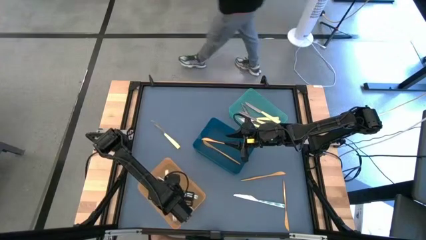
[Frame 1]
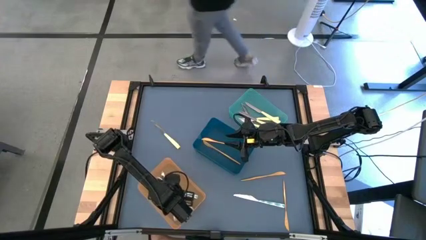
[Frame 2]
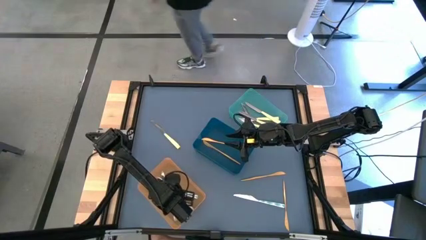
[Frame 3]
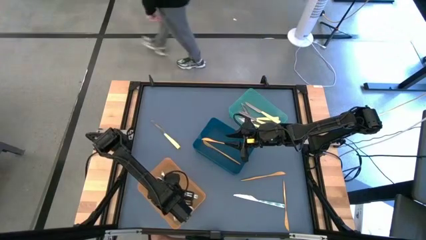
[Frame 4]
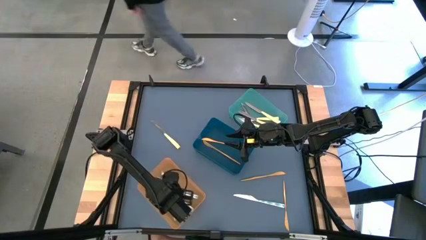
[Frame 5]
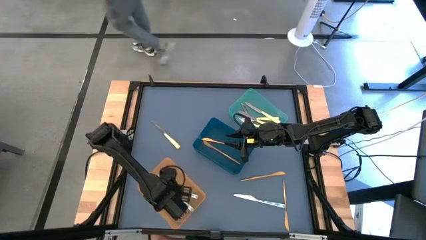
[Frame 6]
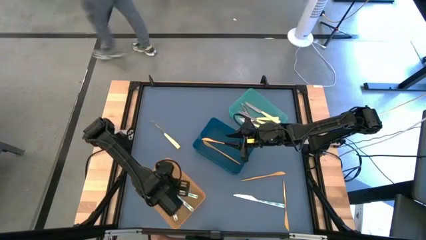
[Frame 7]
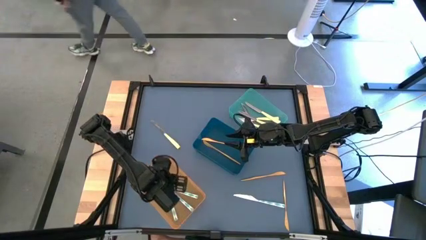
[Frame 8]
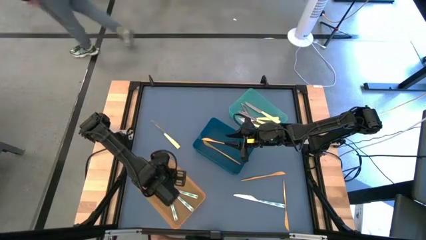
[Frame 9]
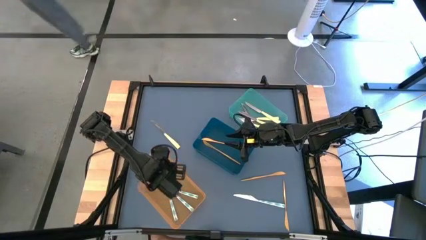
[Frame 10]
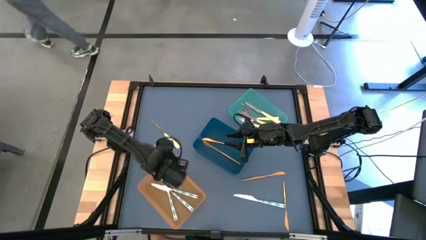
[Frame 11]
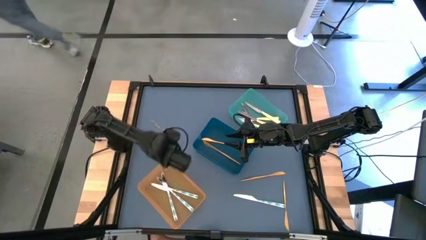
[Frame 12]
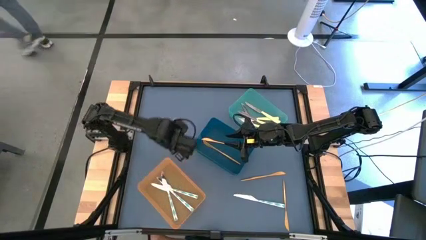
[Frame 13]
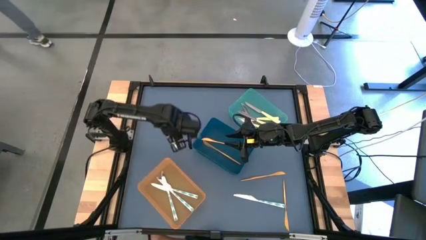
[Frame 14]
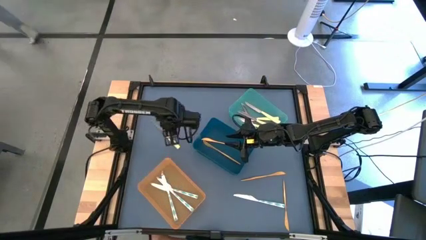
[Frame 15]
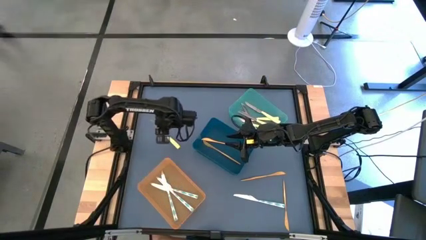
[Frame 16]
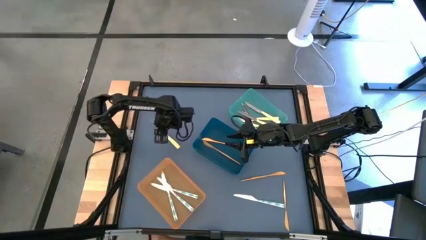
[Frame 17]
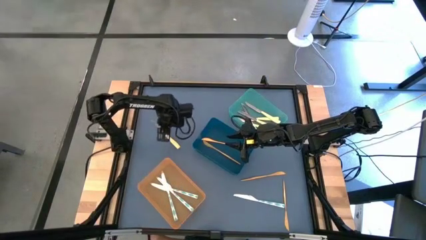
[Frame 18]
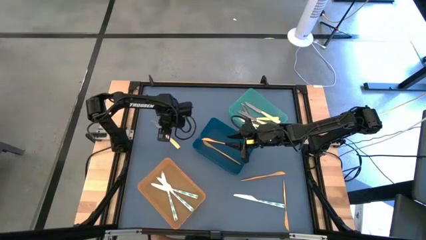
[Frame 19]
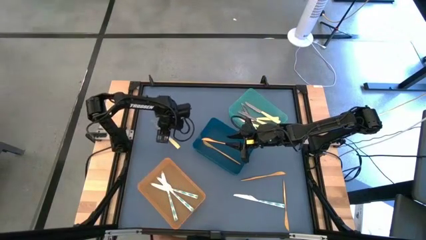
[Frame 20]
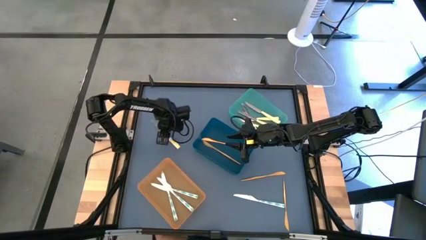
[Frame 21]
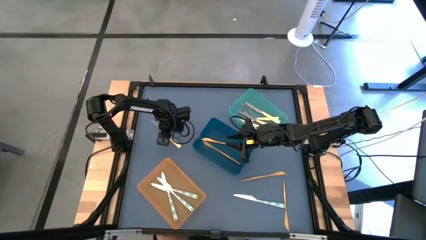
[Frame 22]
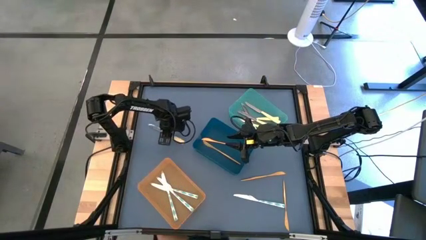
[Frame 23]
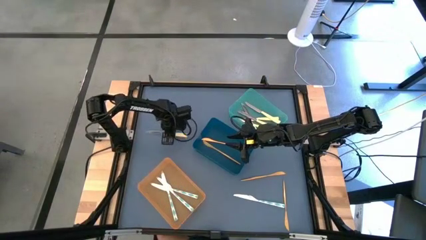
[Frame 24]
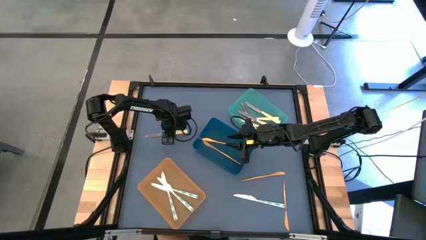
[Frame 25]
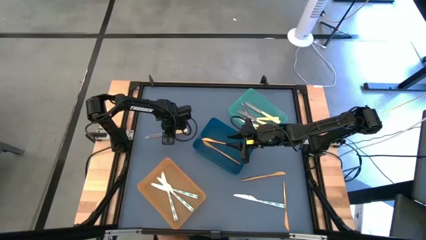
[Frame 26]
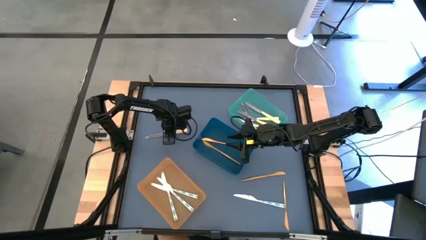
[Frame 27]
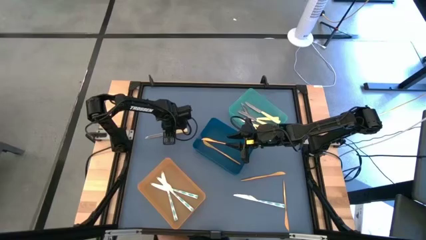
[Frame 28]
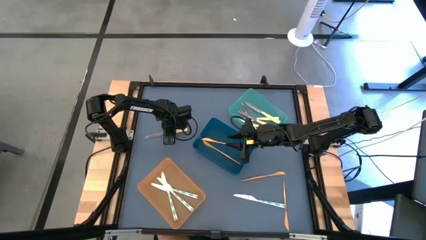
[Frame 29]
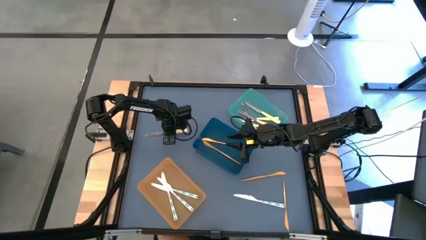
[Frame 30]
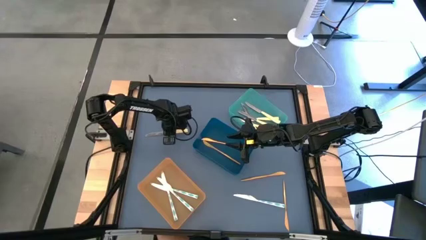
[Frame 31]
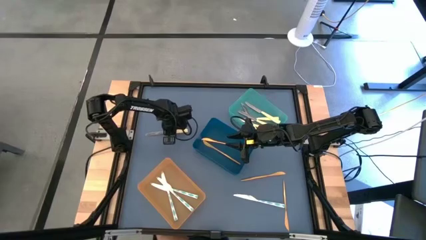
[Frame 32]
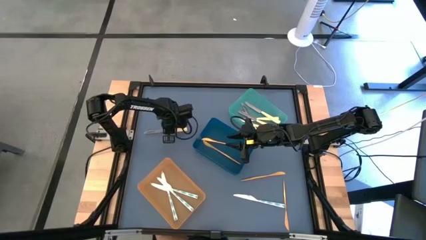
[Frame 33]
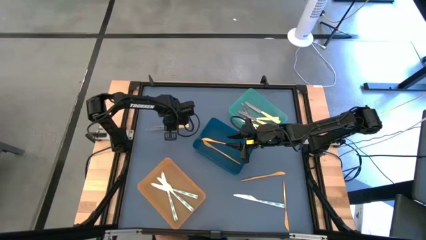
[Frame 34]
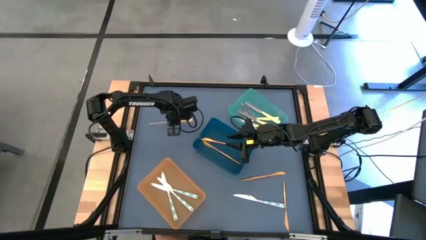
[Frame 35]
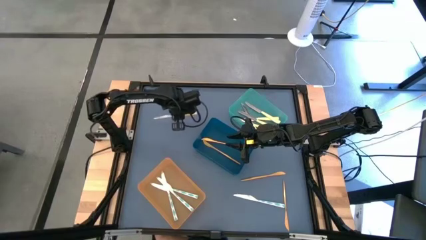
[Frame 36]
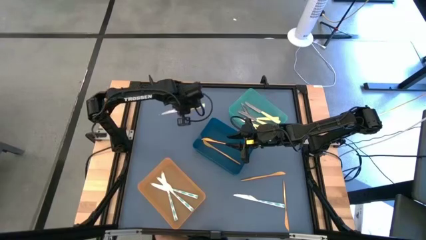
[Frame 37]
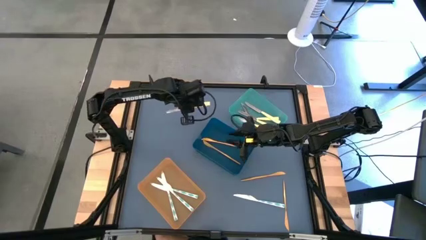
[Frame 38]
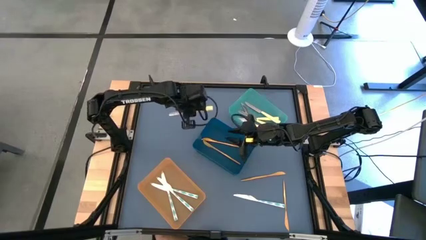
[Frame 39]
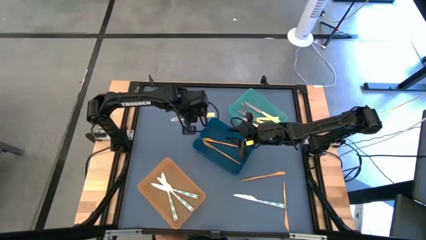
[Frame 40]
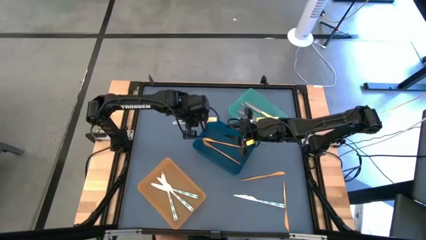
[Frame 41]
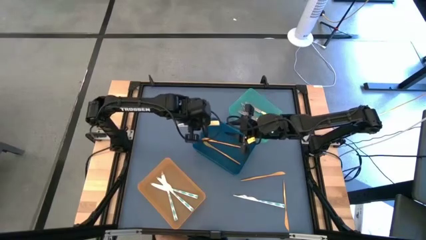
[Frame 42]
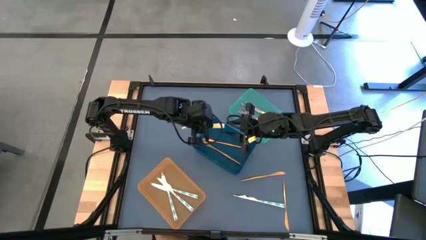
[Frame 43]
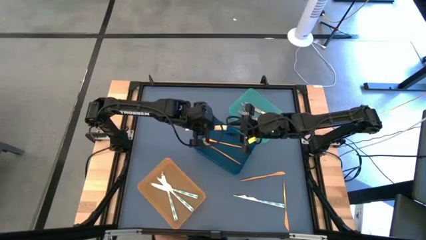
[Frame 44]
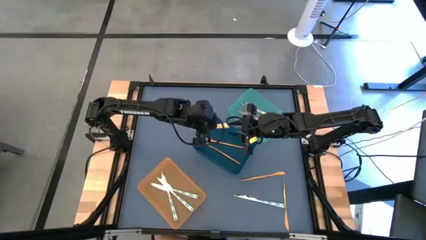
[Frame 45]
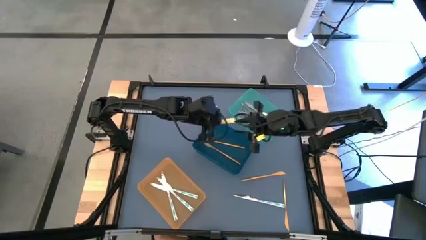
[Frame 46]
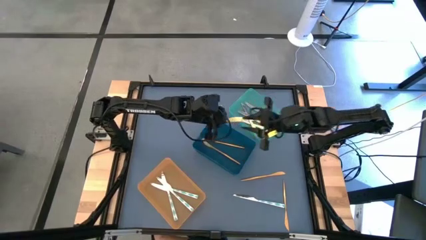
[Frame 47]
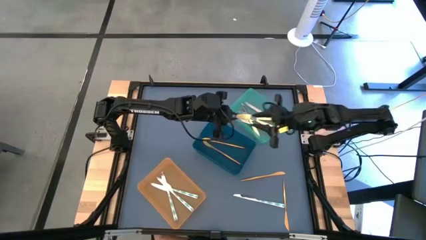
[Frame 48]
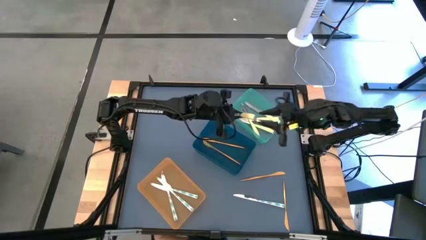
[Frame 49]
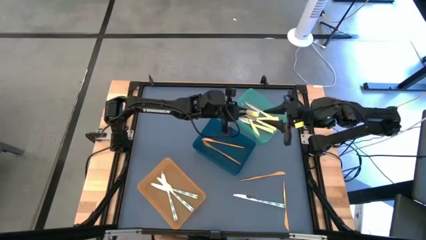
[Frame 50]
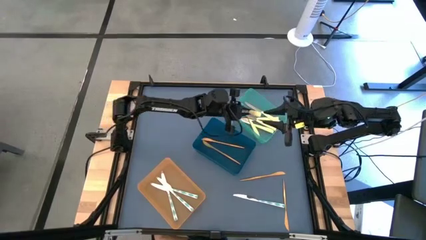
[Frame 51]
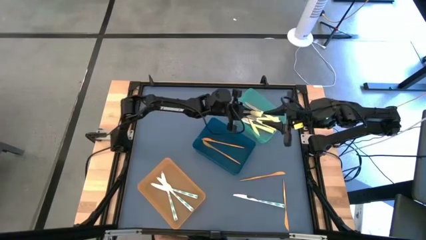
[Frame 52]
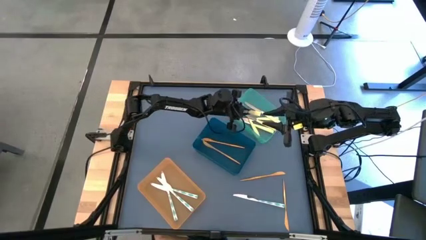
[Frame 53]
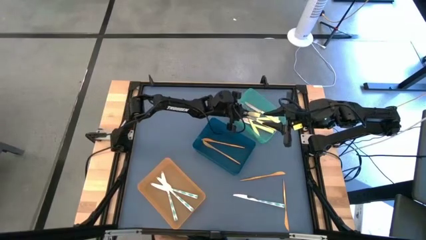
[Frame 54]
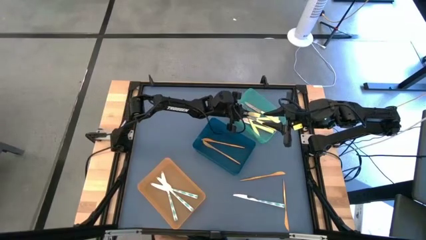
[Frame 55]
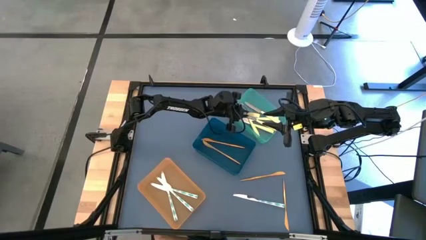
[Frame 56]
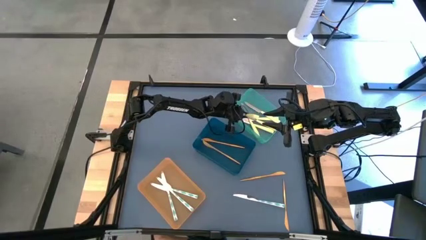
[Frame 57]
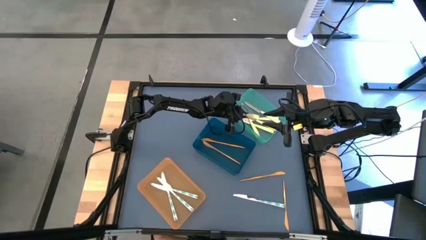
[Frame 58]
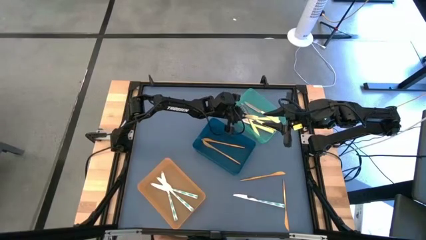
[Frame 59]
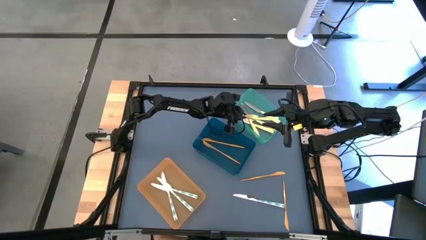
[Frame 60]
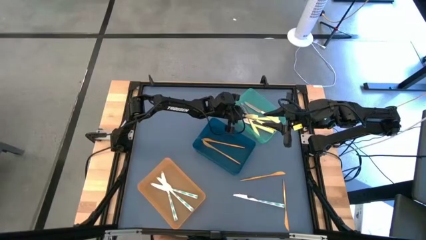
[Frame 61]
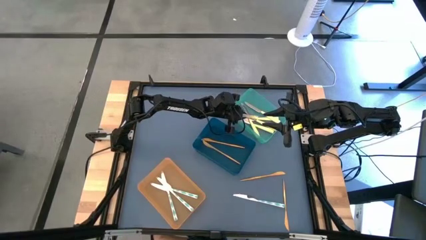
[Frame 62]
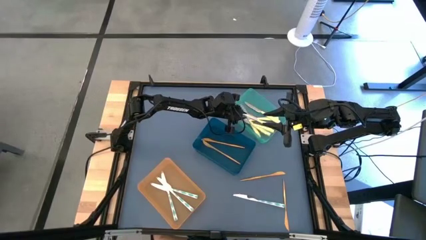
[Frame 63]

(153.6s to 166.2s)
Task: Sort silverware by color (type)
Put the right yellow knife into the light blue bin

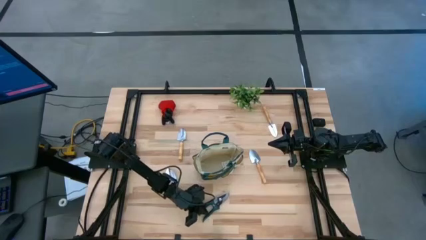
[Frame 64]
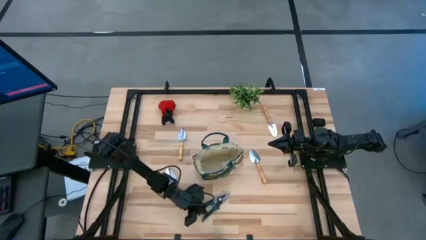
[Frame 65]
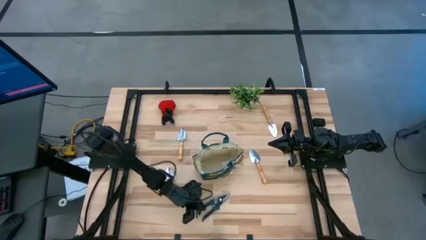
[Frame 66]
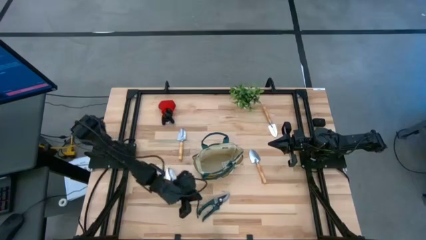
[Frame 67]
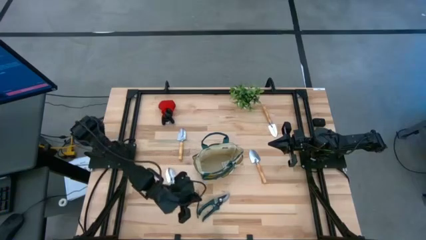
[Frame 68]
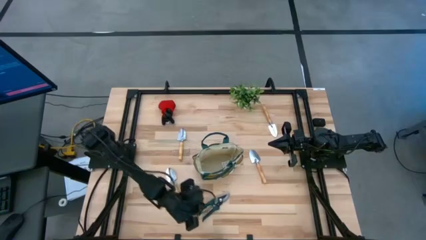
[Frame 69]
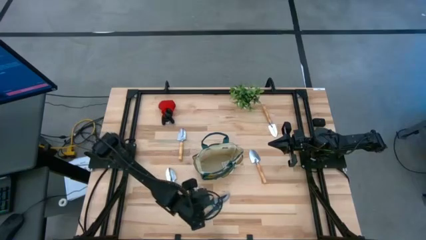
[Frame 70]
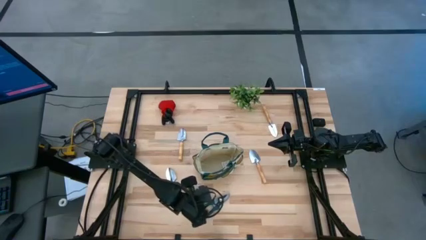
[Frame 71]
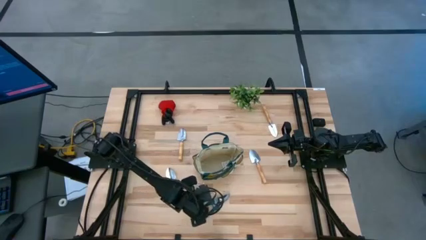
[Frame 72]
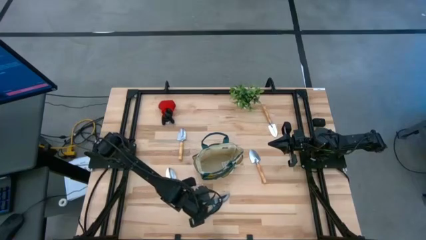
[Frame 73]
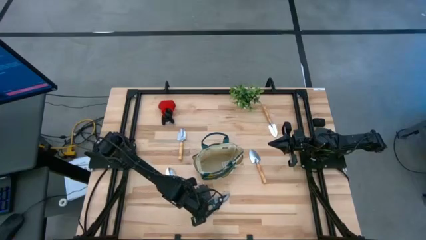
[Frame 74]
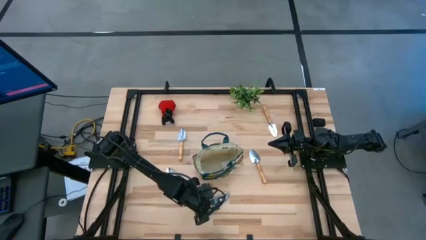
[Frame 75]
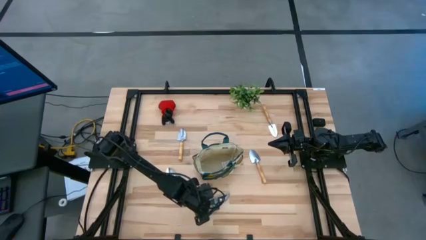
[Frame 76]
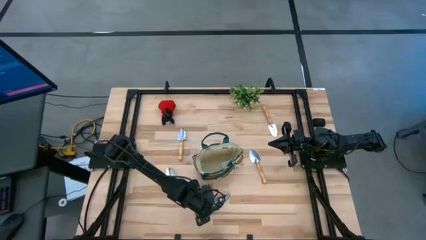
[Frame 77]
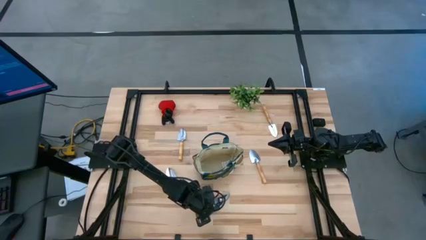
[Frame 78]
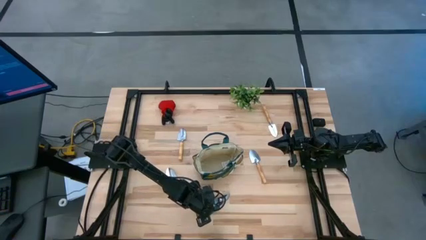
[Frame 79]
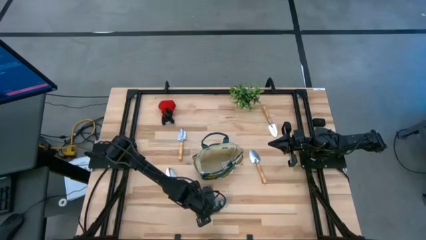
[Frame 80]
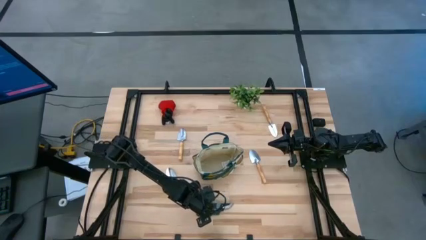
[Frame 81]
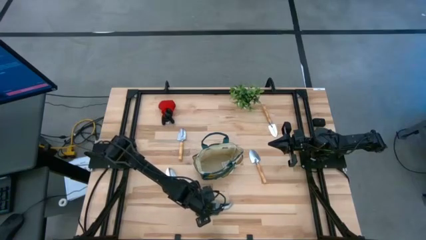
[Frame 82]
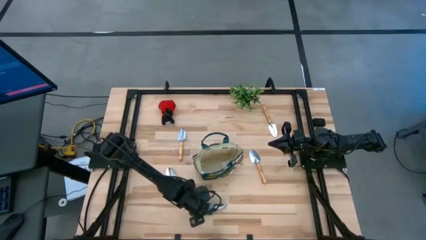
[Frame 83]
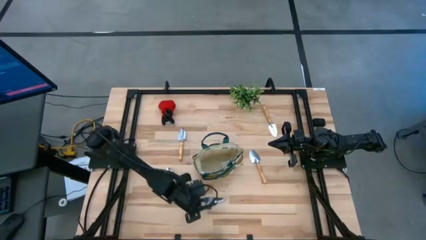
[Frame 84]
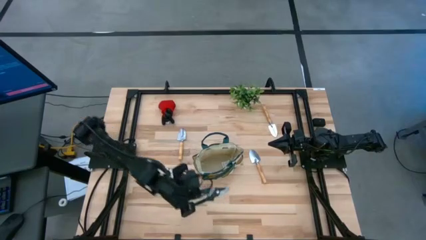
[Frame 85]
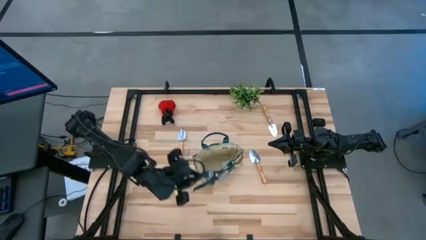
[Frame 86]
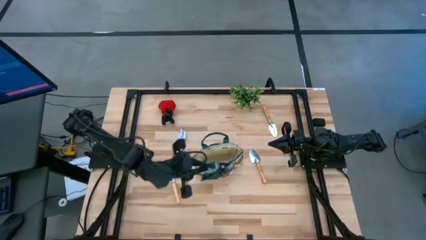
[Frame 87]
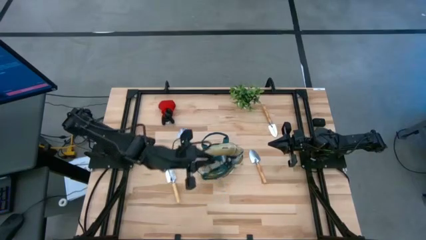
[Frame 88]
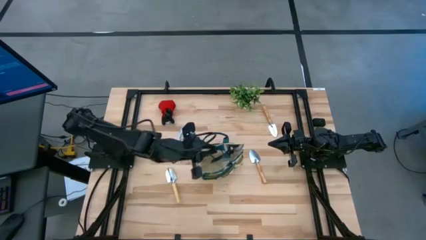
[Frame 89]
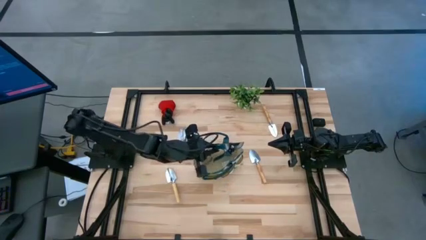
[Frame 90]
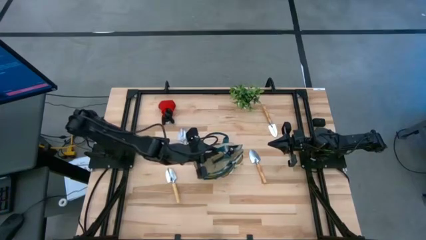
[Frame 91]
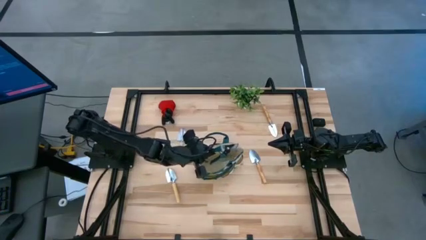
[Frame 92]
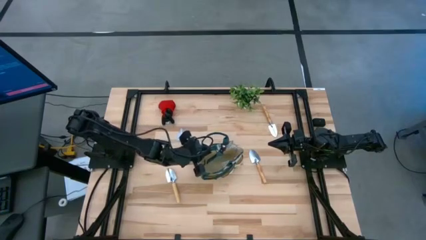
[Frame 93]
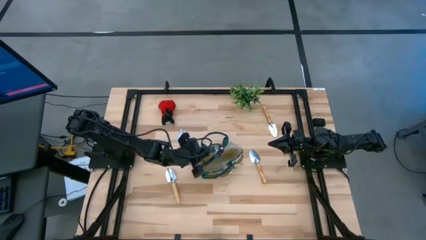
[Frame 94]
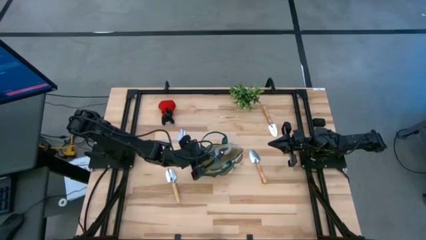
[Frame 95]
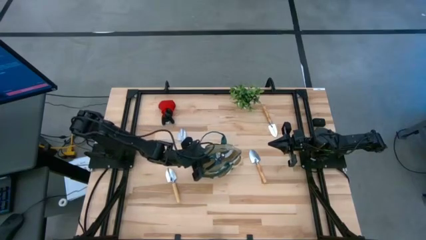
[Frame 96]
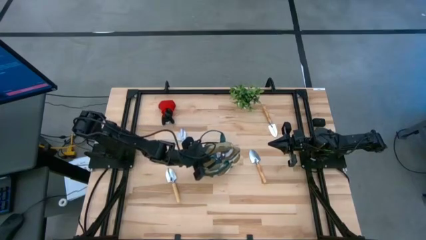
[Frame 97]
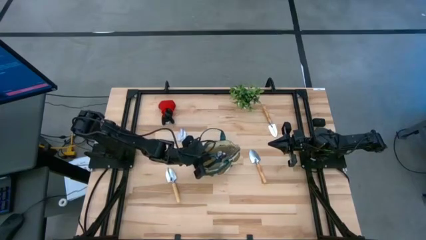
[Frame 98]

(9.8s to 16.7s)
Task: Pick & Place Garden tools in Gardening bag
Put the green scissors into the gardening bag
